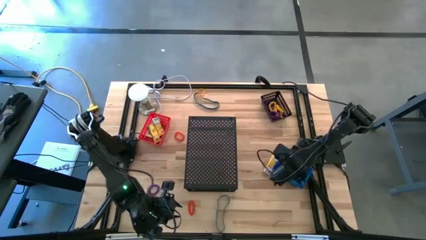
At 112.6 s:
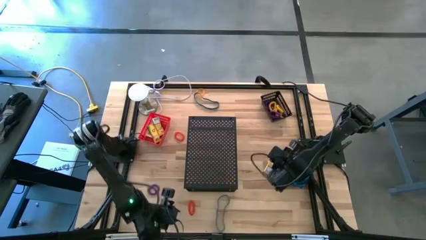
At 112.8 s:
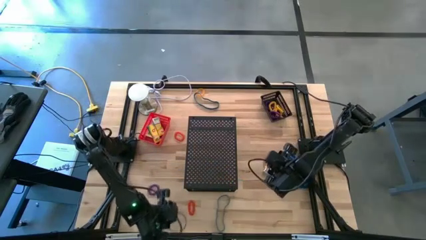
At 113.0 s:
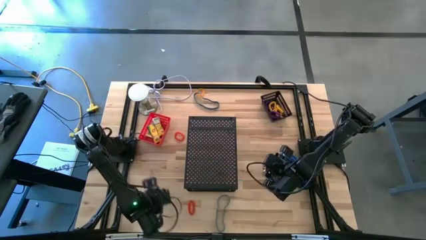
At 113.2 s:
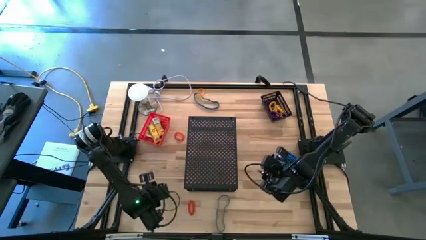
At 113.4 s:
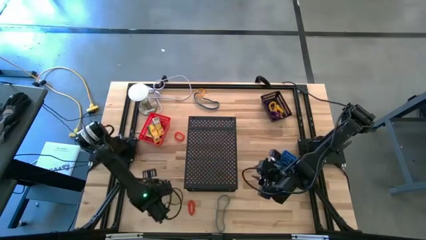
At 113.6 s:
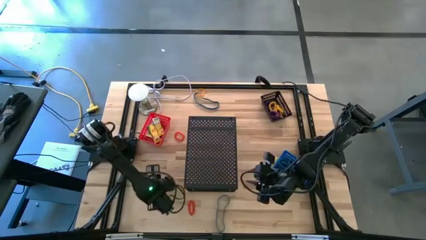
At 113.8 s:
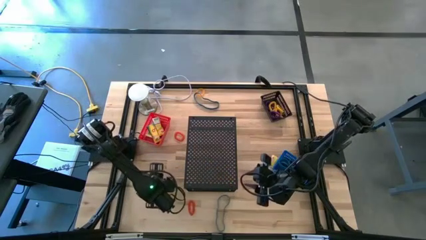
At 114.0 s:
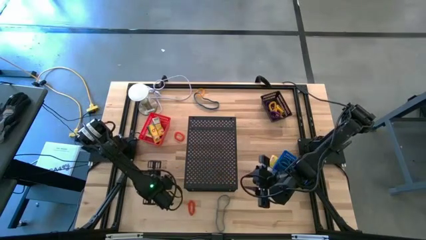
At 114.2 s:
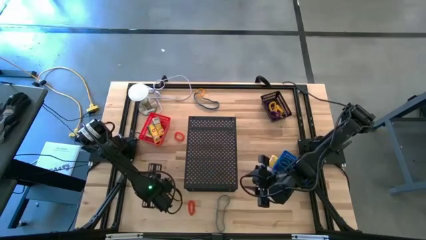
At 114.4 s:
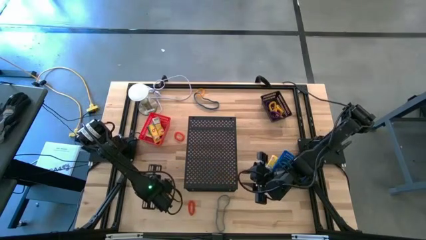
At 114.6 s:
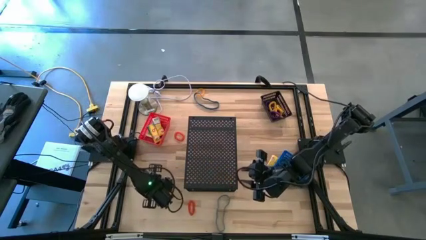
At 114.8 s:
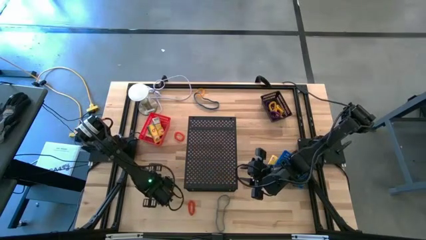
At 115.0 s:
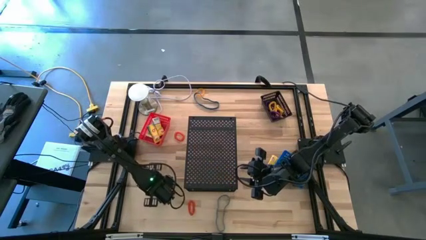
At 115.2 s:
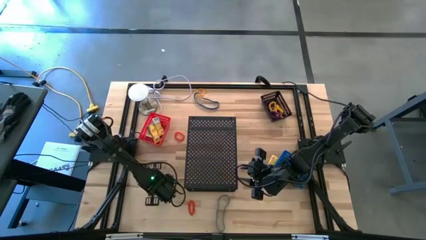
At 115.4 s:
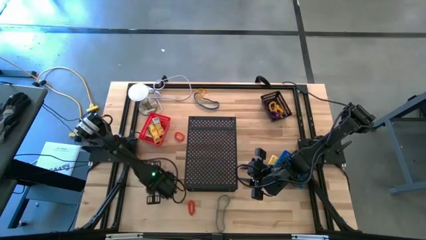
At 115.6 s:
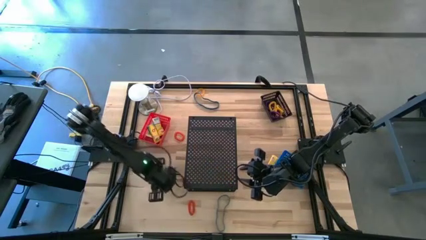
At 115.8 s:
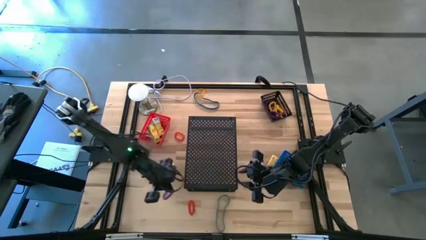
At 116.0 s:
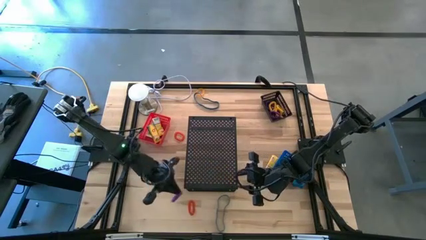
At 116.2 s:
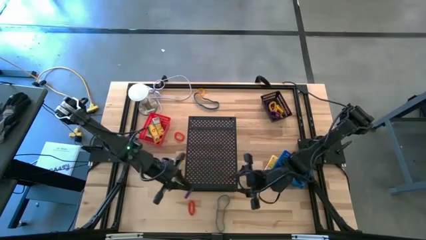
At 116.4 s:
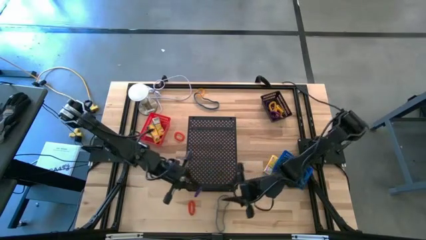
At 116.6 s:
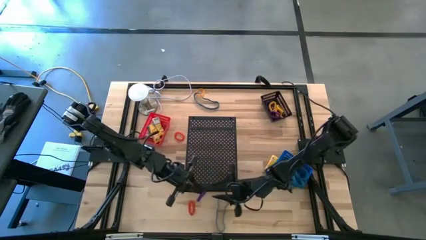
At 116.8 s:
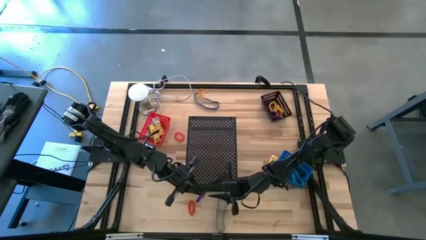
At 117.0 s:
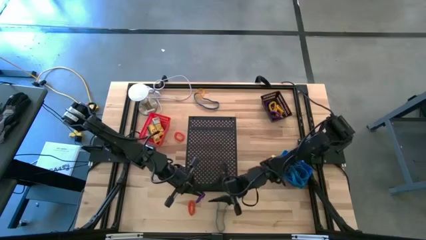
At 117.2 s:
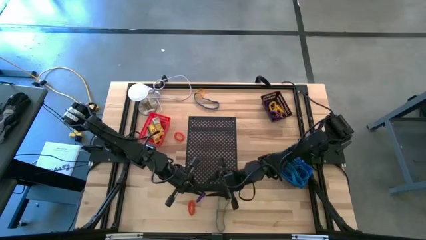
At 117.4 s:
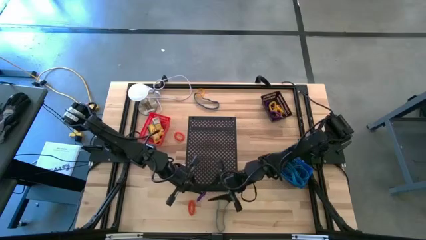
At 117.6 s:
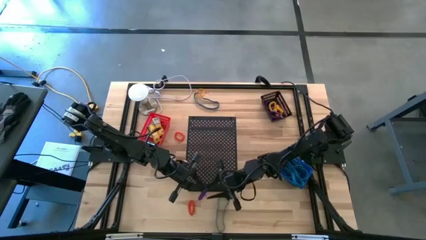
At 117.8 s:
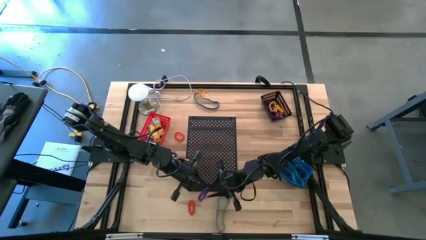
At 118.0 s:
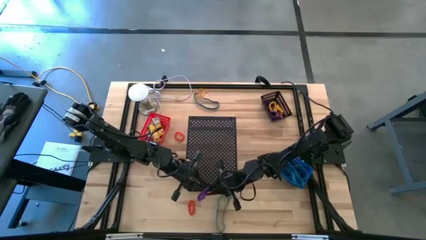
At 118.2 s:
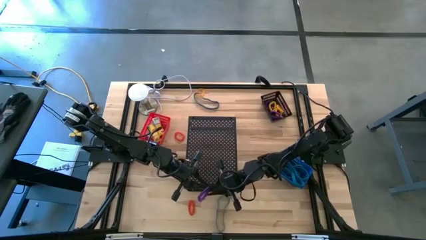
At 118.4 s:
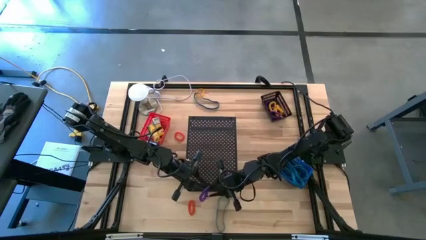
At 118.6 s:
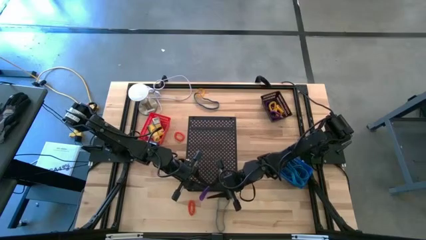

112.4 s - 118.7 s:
Task: Pick & Place Office Desk Supplies
Put the violet spring keychain into the black bin

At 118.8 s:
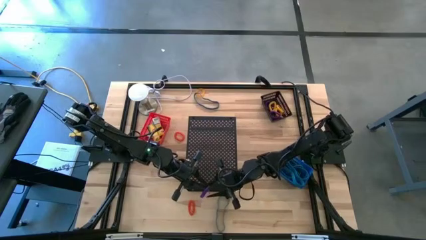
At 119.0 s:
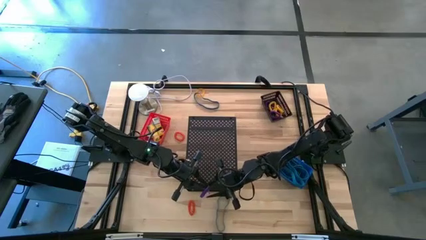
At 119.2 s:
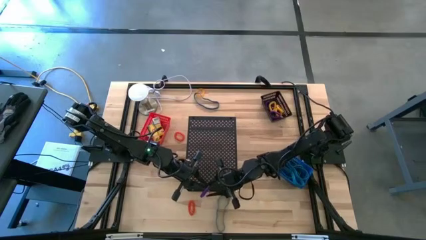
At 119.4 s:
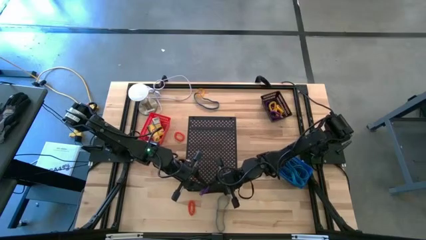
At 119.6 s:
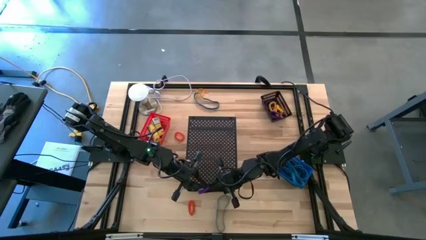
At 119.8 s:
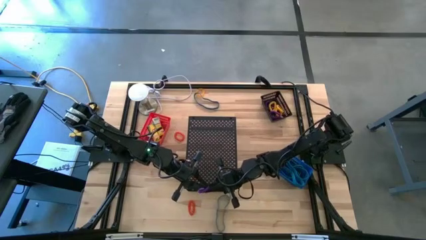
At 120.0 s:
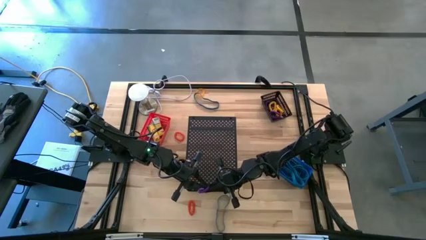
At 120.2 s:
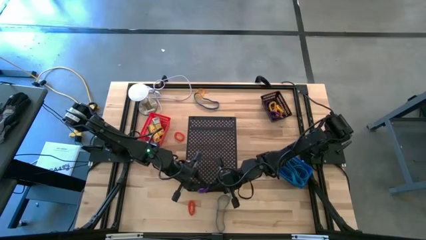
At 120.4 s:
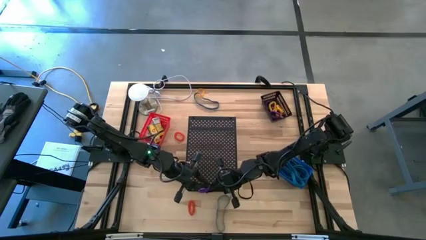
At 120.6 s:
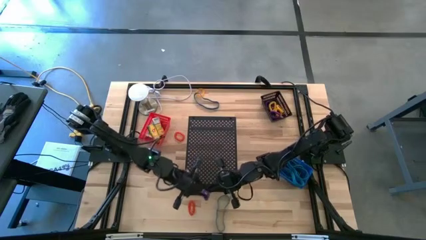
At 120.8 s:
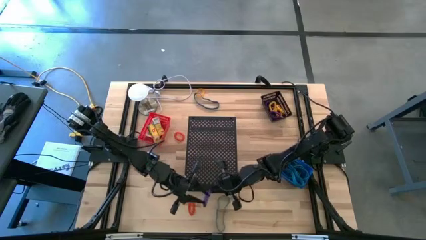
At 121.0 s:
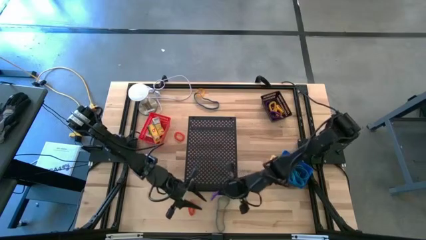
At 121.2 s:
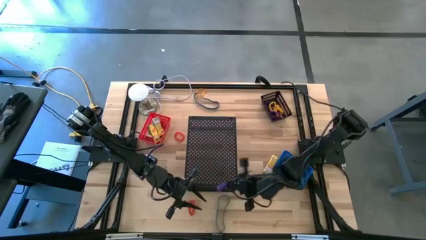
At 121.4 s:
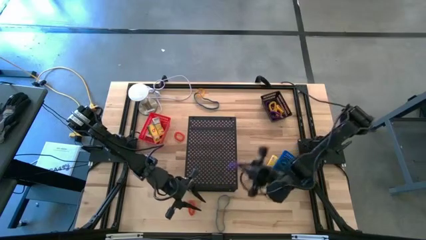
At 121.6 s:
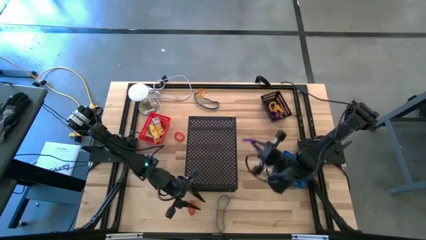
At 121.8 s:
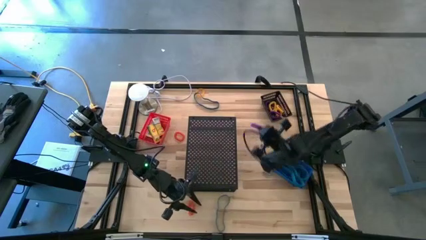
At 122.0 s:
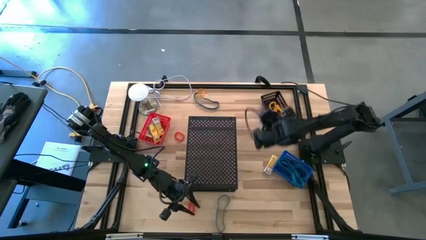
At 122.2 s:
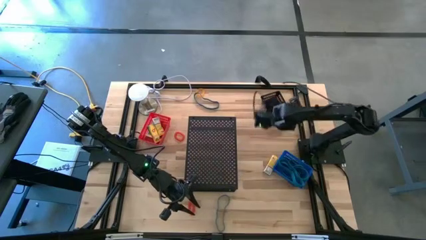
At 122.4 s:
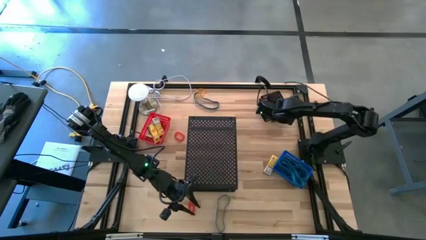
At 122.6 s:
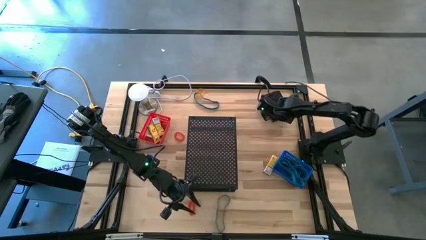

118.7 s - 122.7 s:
Put the violet spring keychain into the black bin

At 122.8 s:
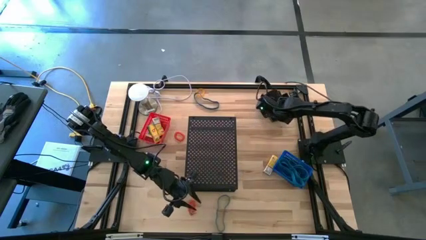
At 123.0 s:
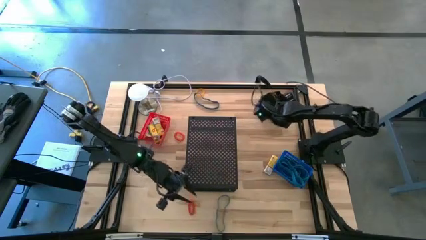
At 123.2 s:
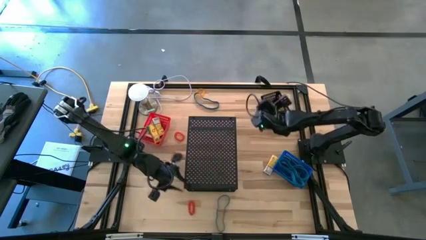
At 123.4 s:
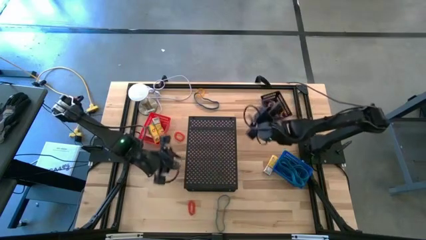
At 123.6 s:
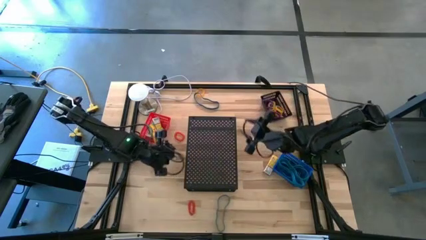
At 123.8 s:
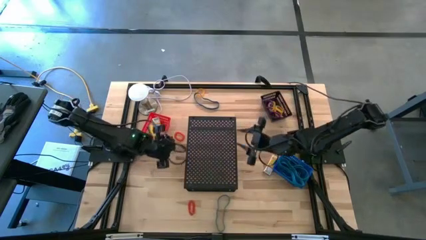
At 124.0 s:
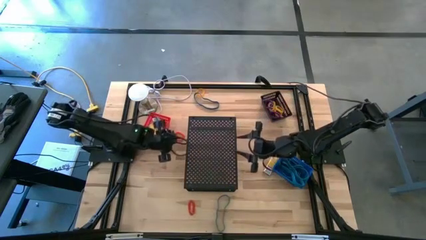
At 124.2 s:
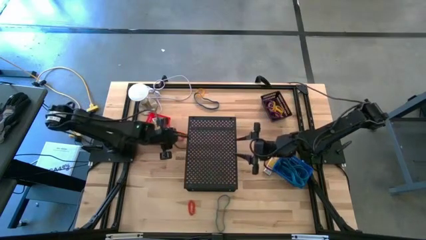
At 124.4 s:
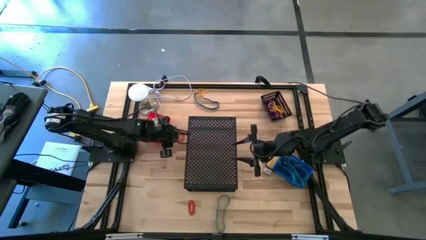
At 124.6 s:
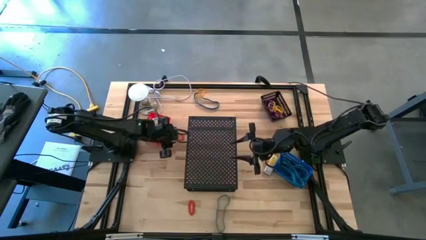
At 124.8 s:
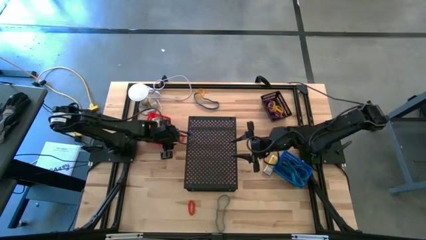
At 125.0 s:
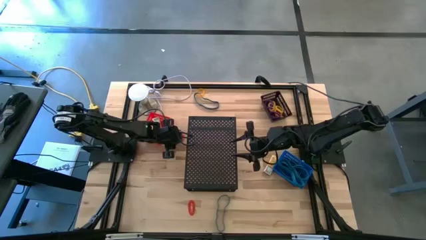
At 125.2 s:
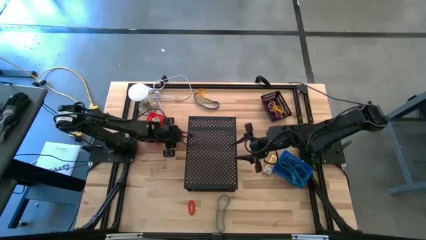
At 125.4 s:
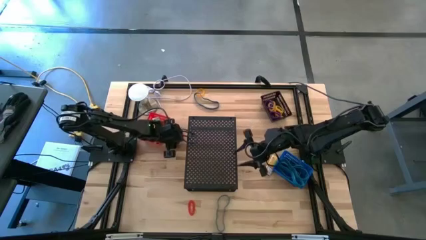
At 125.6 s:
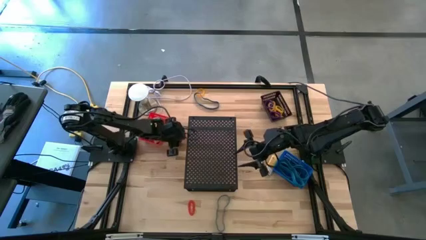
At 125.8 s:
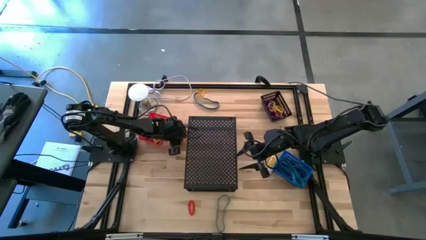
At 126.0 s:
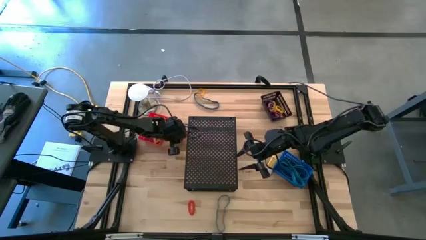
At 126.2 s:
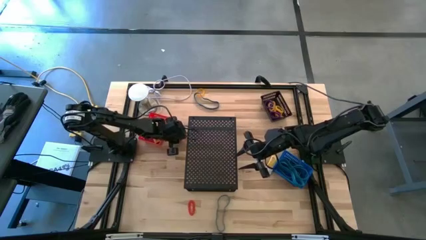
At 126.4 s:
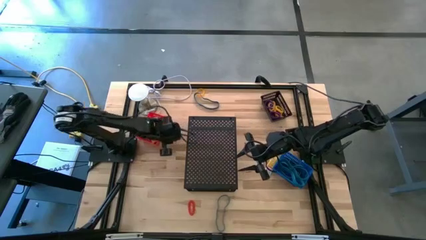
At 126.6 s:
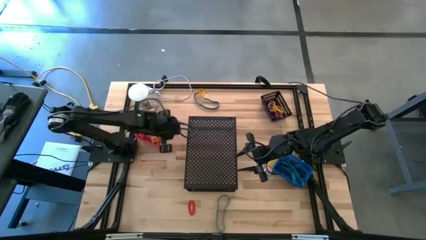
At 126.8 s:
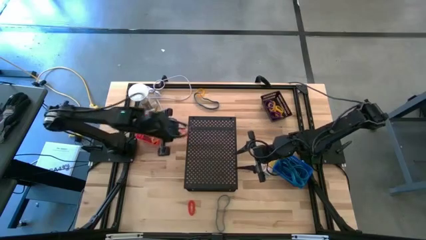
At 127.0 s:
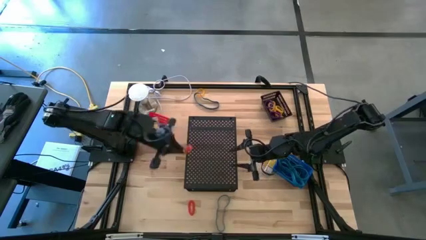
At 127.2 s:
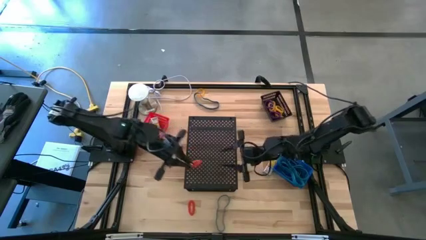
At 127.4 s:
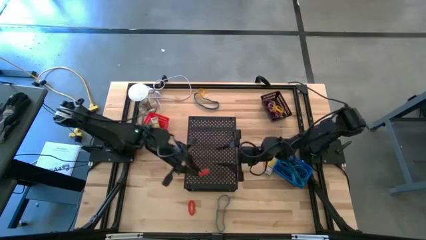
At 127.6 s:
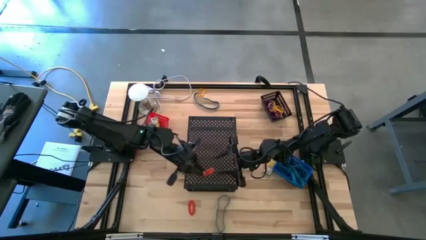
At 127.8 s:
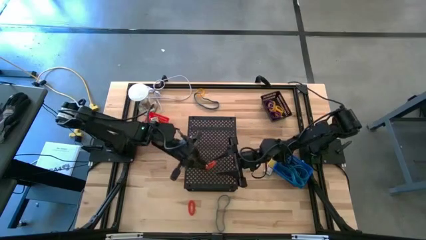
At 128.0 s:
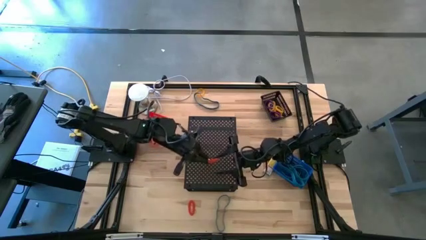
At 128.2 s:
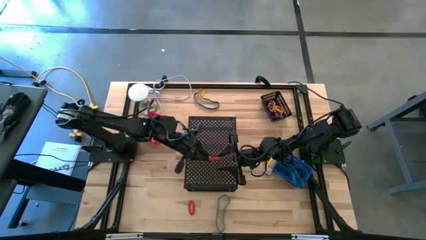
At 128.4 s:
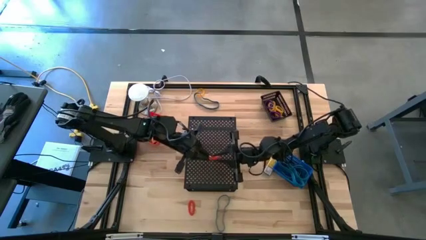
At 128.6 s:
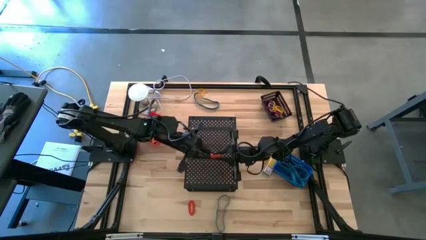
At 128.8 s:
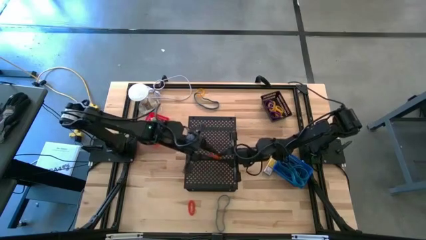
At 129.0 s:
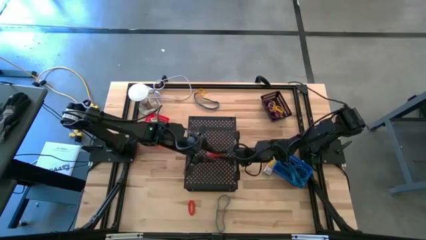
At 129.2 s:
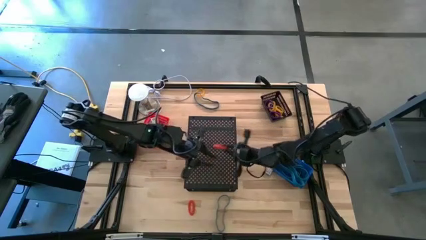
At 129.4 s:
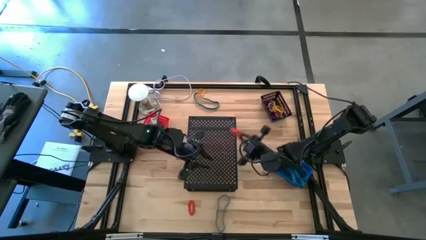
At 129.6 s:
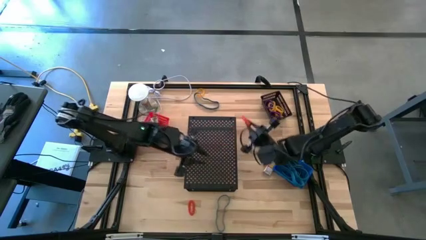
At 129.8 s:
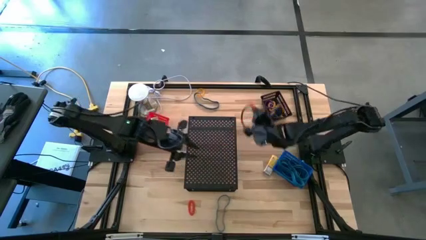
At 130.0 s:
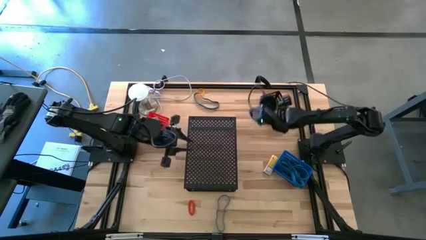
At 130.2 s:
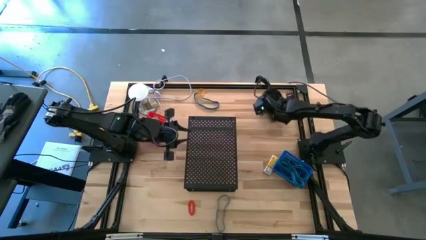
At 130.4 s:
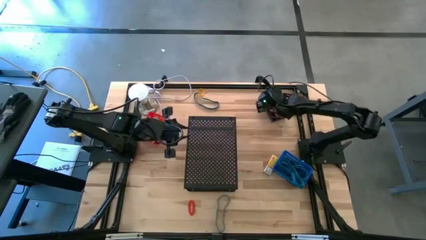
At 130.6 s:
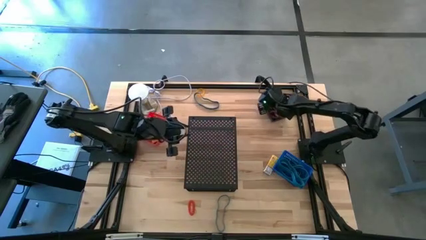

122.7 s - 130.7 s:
Put the orange spring keychain into the black bin
